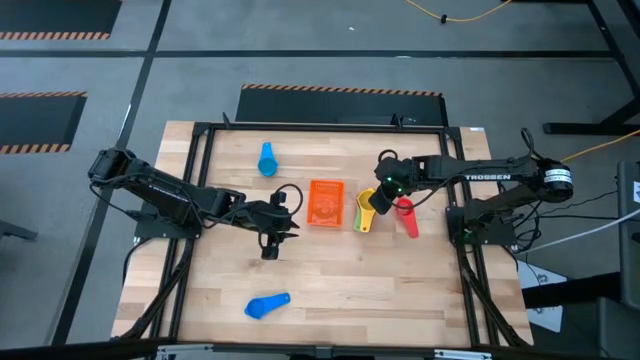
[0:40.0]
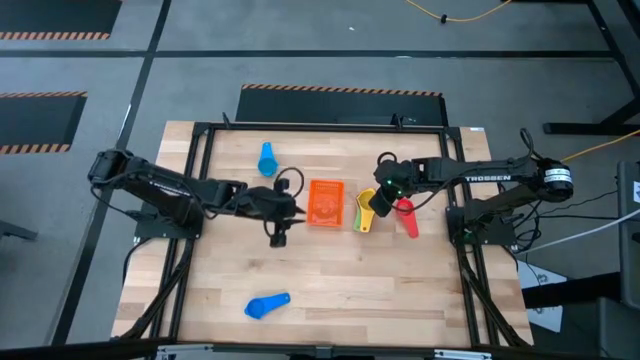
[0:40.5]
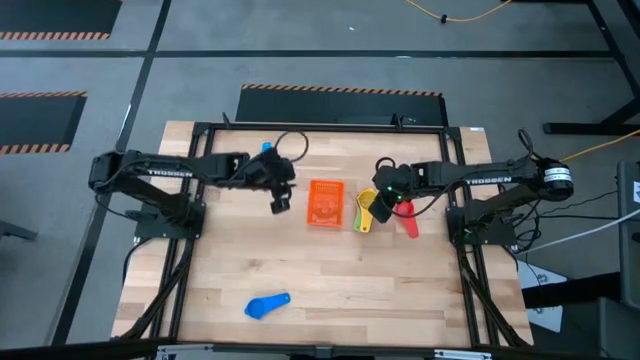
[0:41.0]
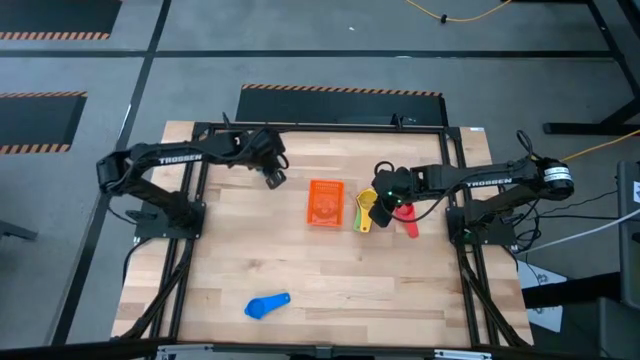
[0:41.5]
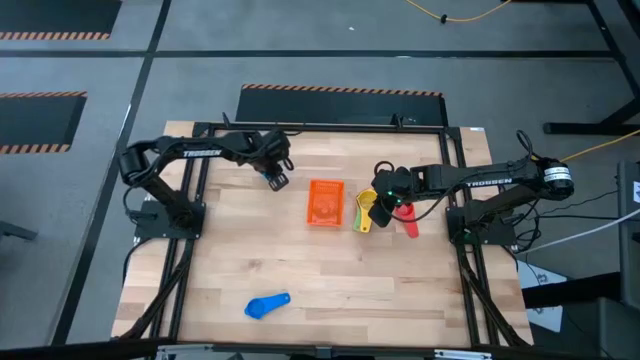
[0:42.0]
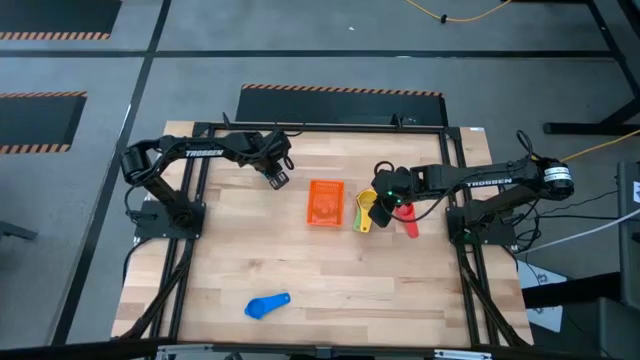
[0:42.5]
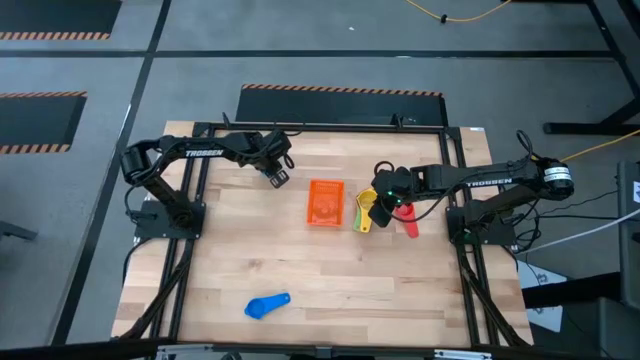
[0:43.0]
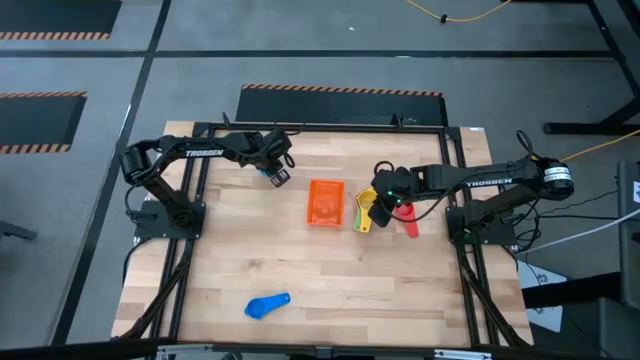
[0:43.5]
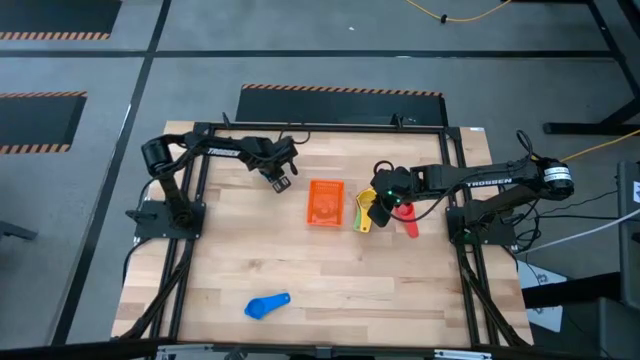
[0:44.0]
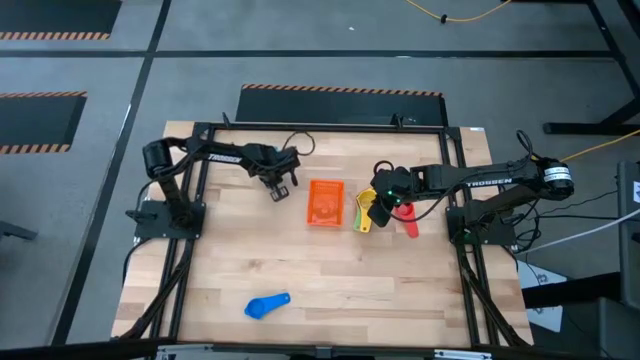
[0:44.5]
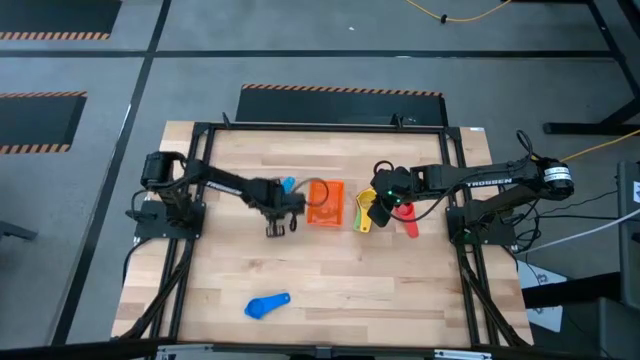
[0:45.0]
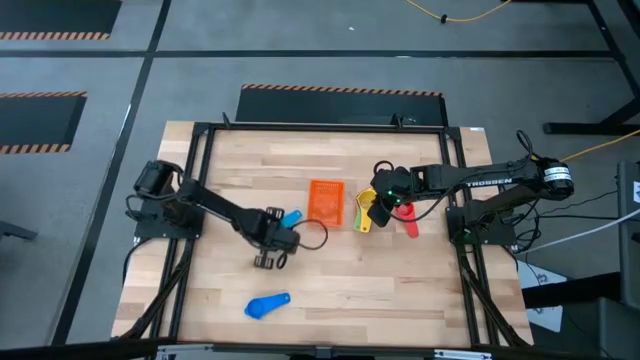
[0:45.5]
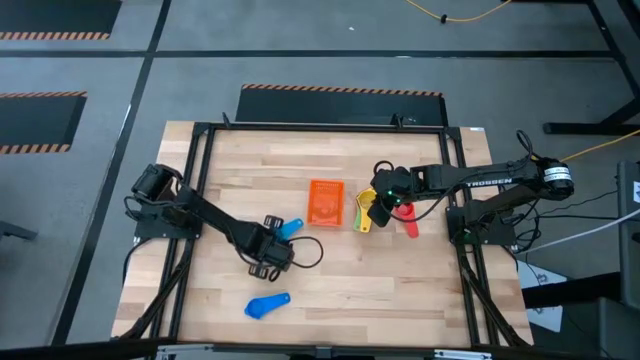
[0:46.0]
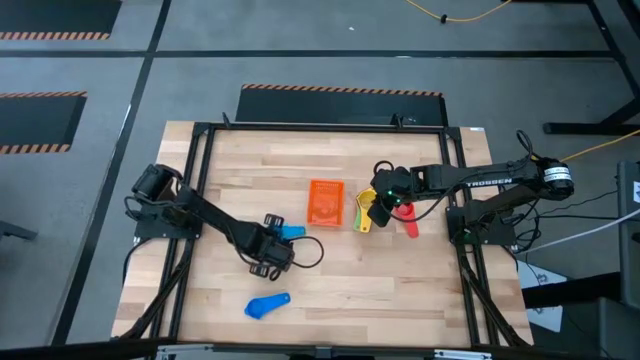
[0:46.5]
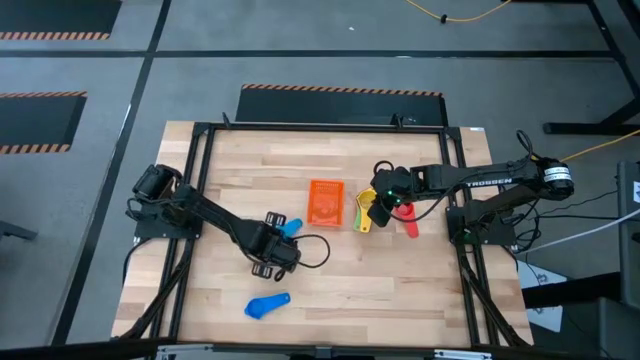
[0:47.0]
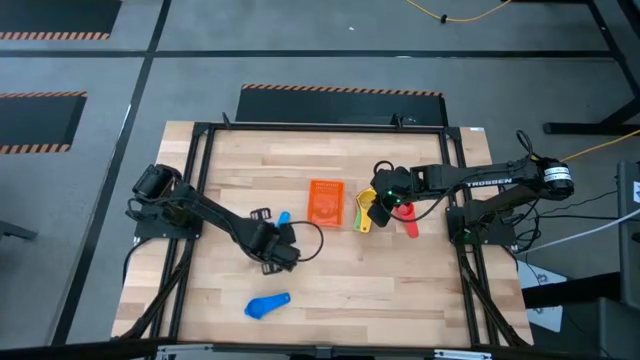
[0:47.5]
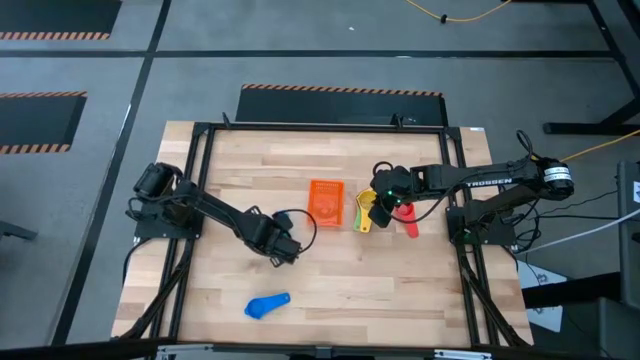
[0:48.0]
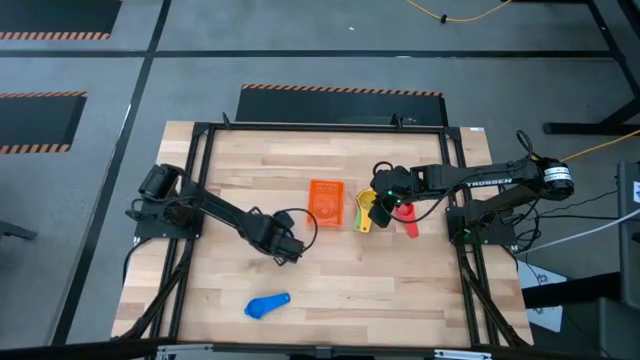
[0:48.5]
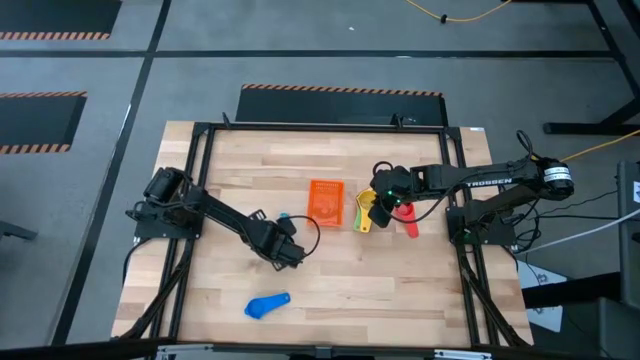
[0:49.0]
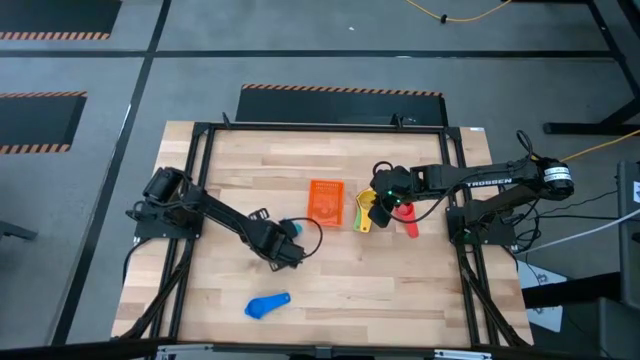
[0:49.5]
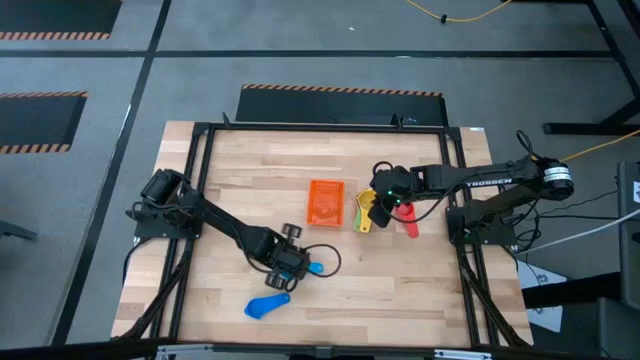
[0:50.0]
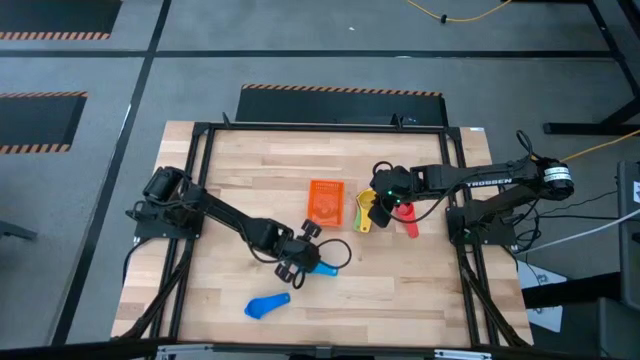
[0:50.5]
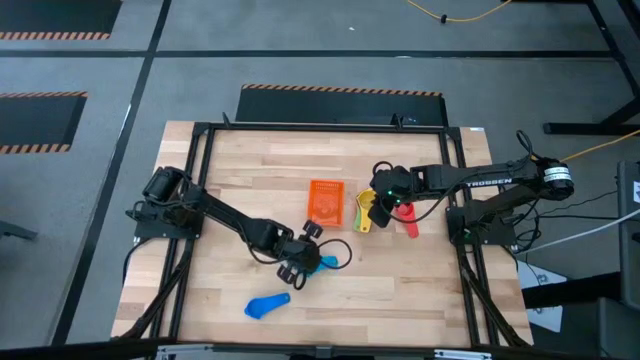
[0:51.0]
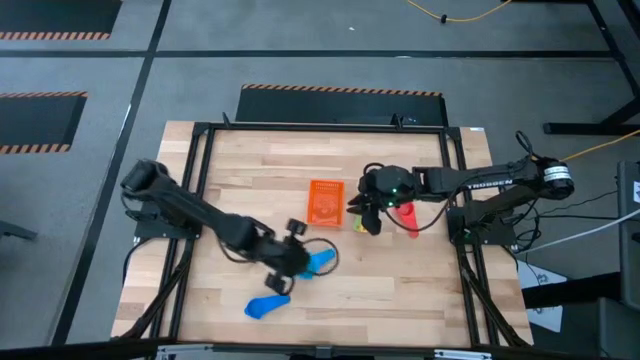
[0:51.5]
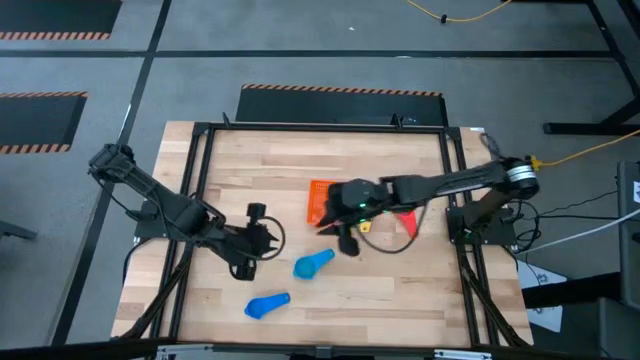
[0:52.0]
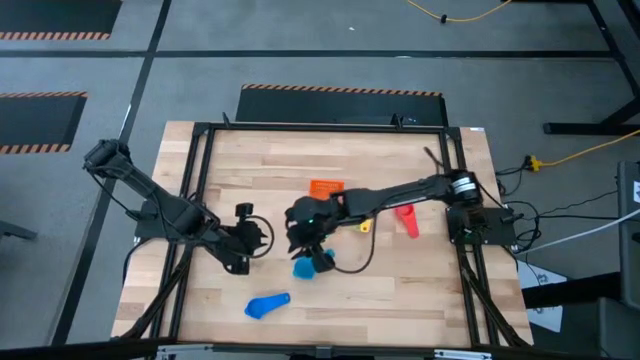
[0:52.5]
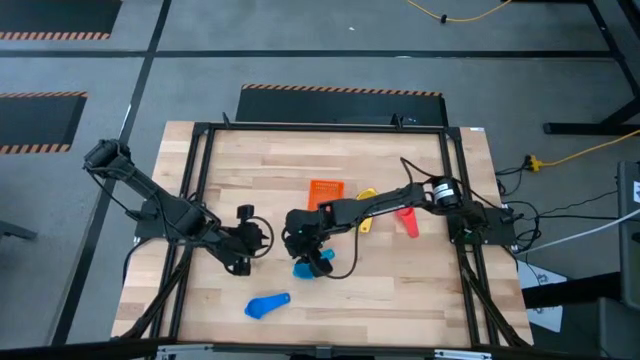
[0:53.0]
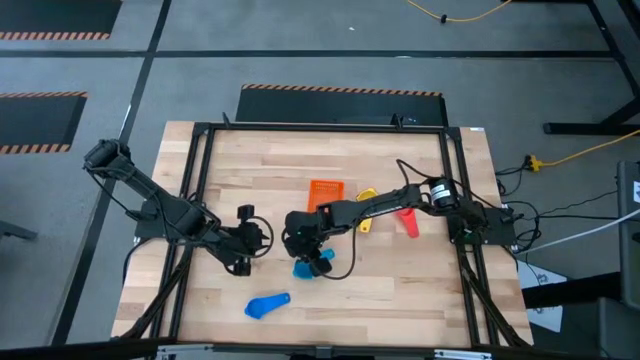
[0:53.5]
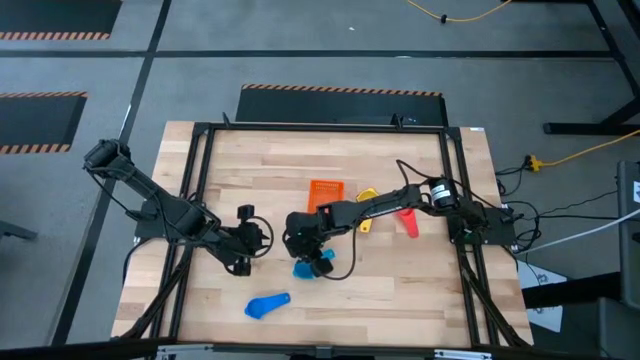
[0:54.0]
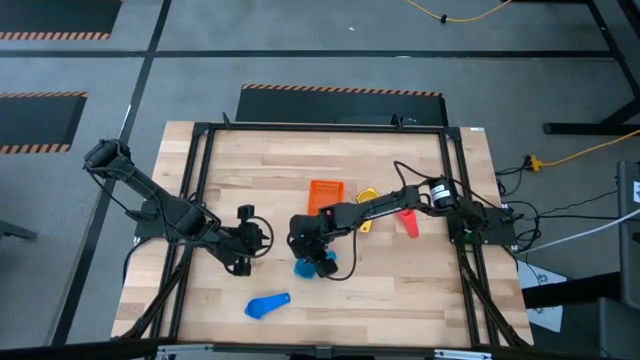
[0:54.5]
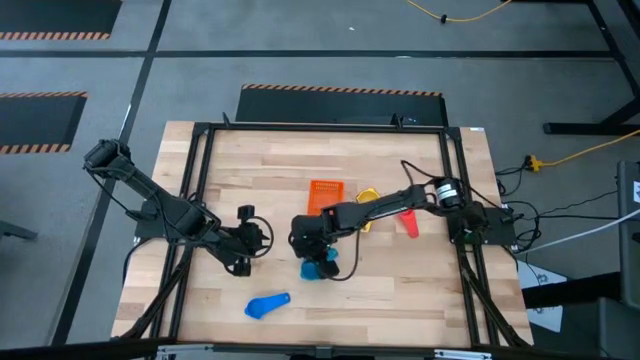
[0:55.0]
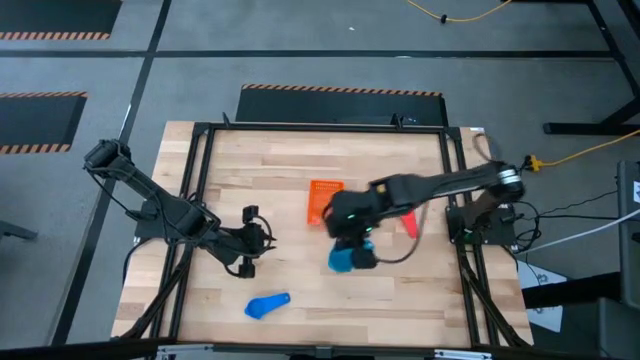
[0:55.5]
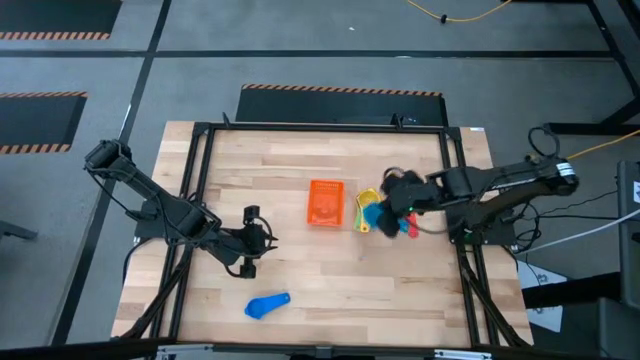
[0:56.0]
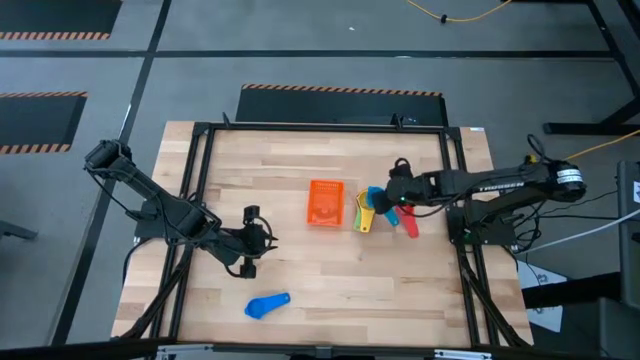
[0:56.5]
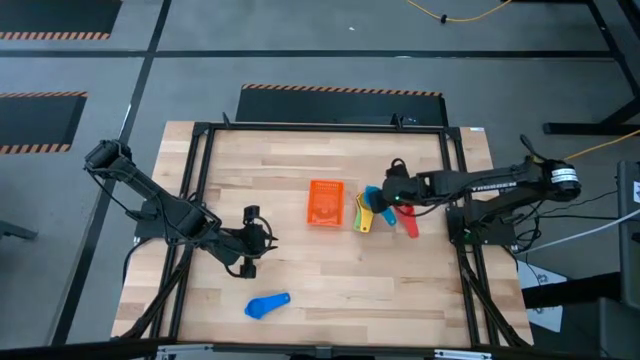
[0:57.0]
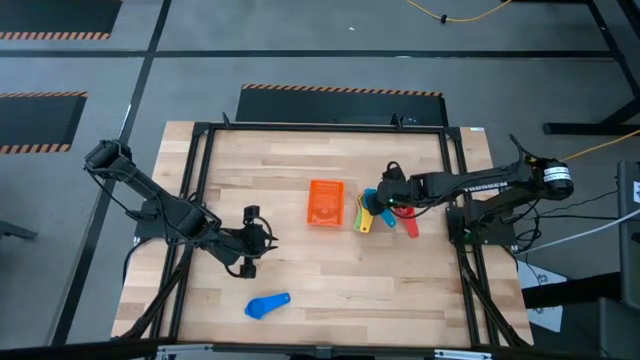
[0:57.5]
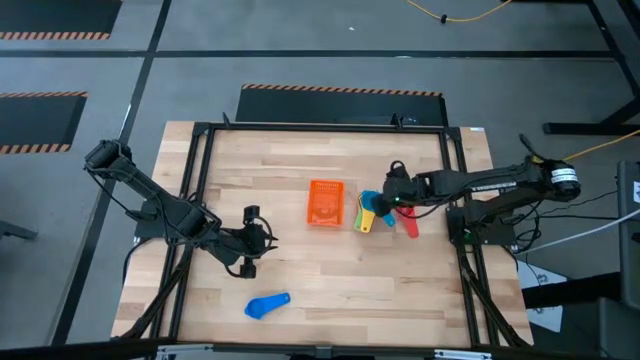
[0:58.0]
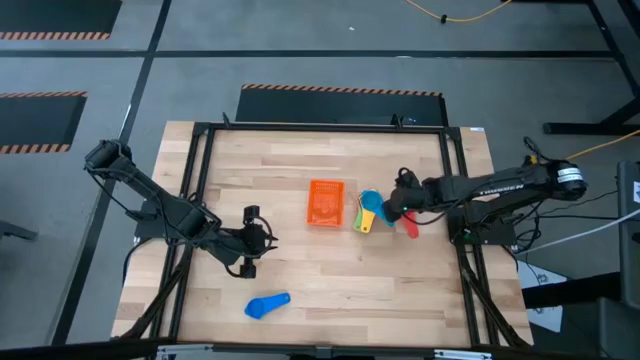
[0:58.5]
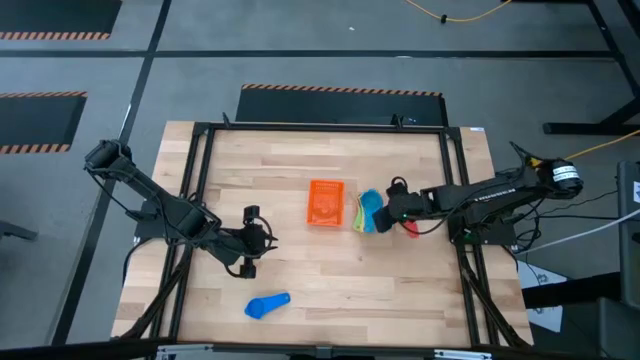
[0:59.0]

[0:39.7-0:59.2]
Task: Nest measuring cups in basket
Stack the top light blue measuring cup on top of the yellow measuring cup
